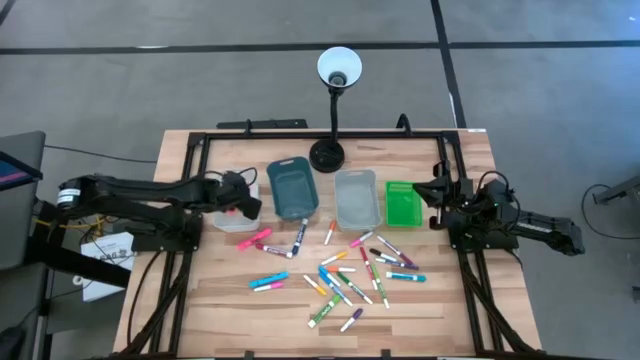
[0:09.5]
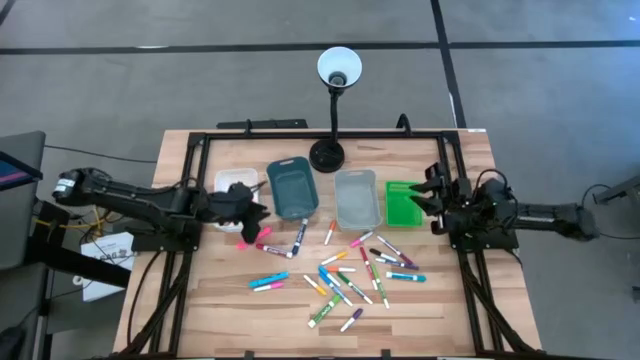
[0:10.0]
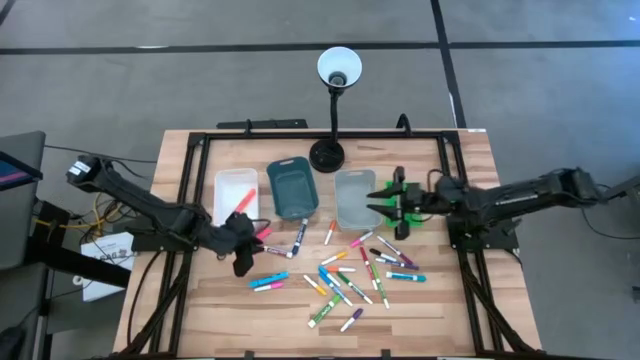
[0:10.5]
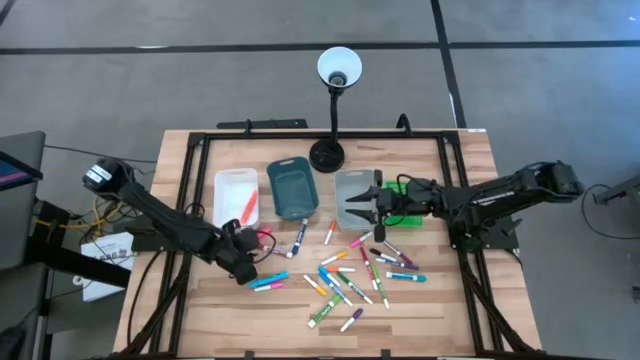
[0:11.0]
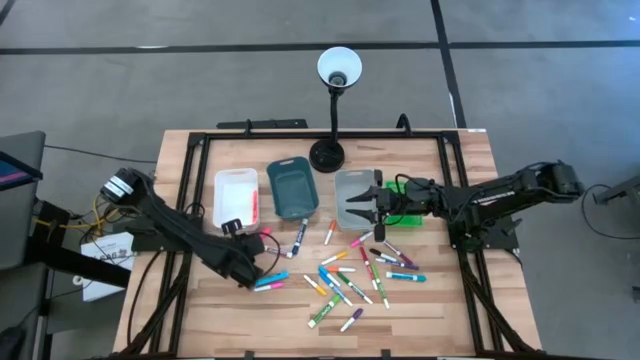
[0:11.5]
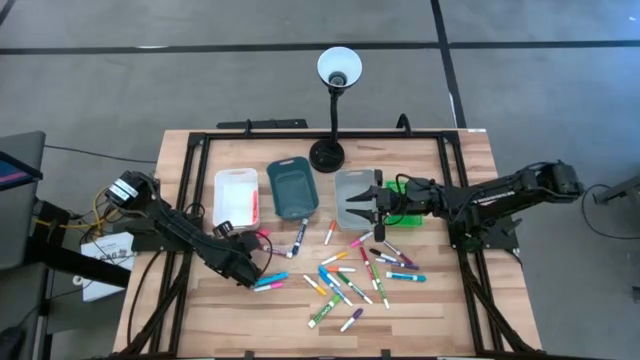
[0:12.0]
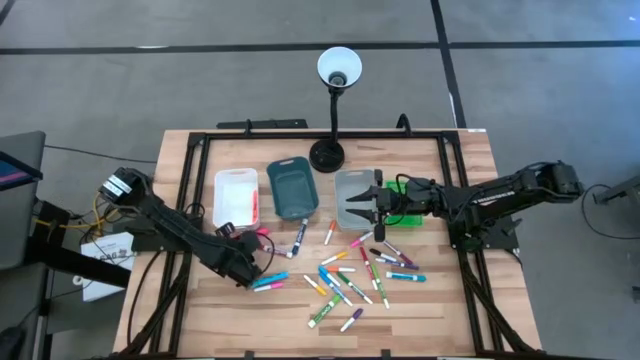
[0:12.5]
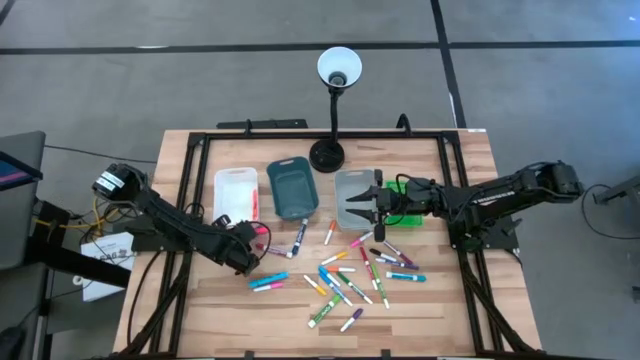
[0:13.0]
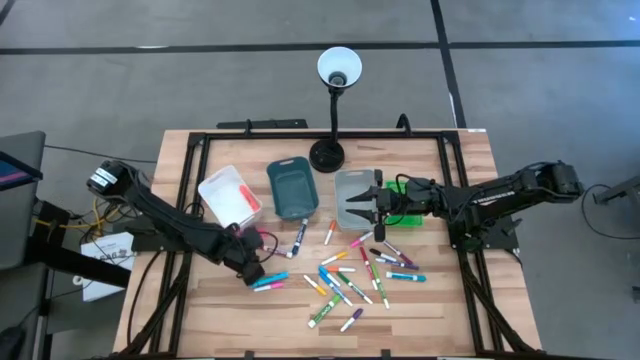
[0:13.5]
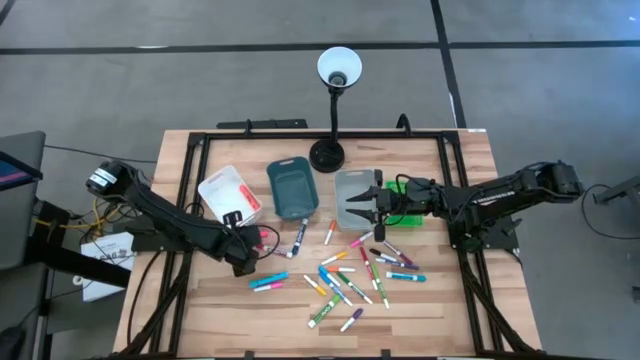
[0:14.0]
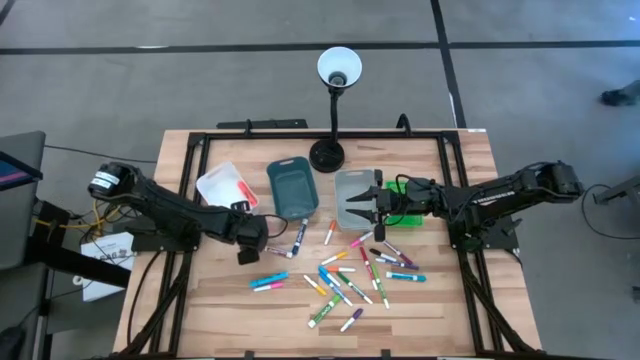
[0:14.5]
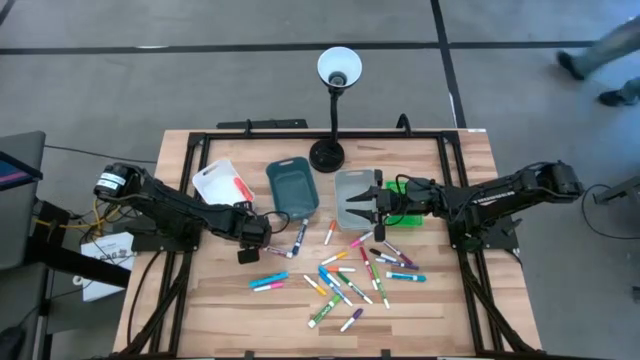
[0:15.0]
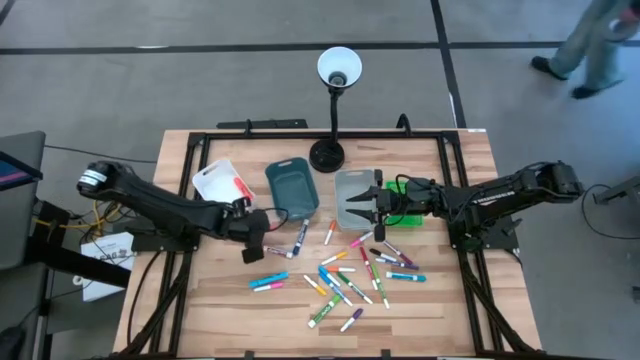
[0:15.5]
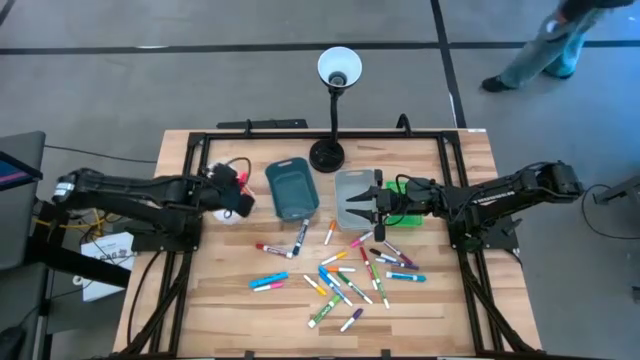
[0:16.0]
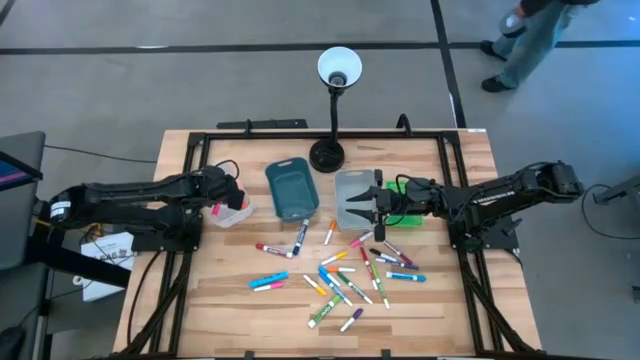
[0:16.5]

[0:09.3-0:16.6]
Task: Pick & Place Markers
Put the pink highlighter pen into the white bin

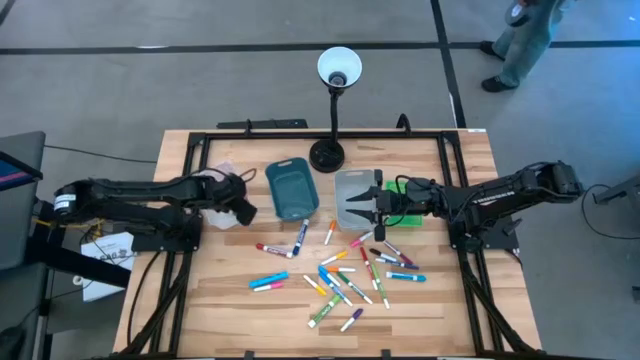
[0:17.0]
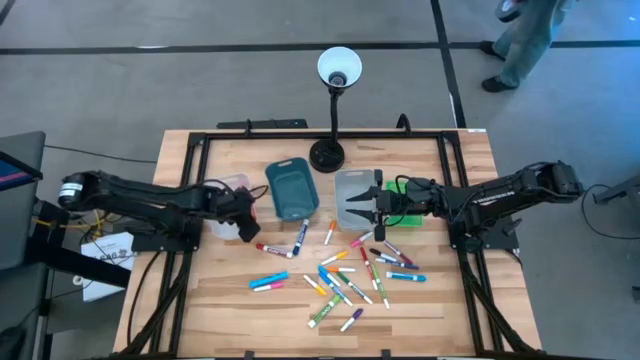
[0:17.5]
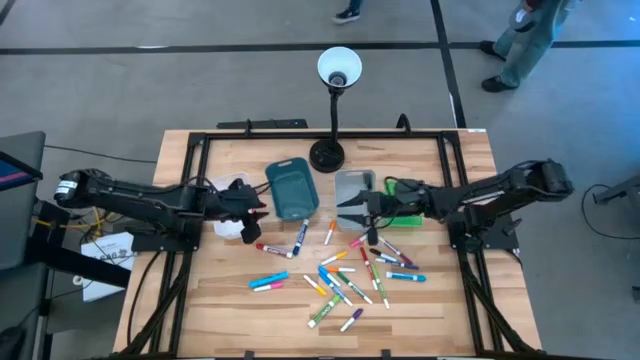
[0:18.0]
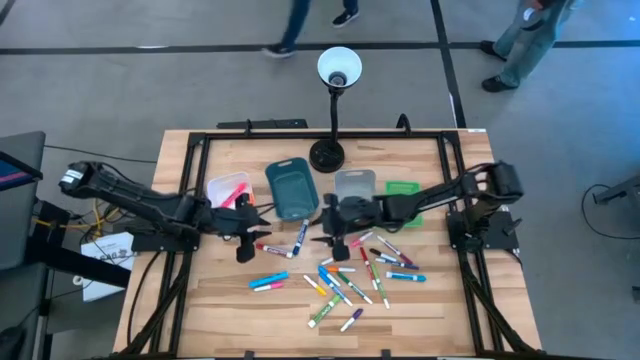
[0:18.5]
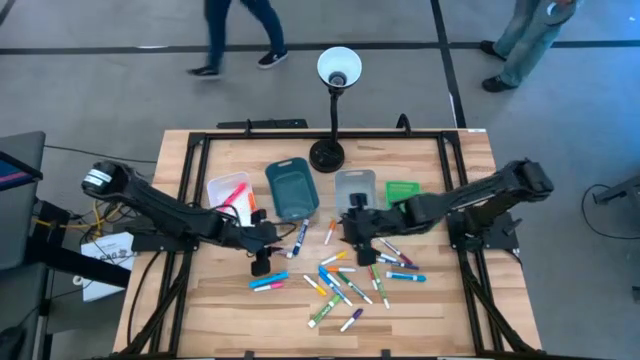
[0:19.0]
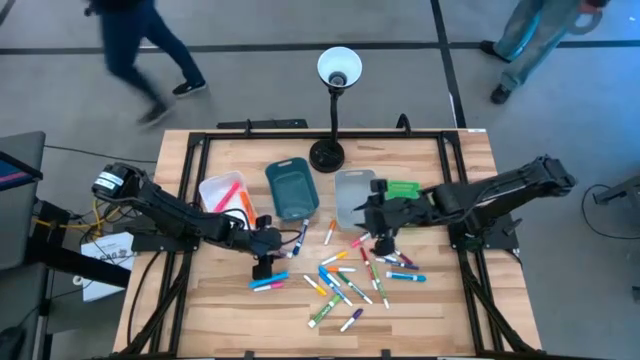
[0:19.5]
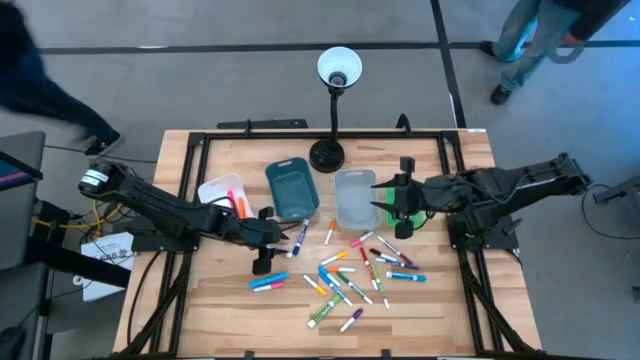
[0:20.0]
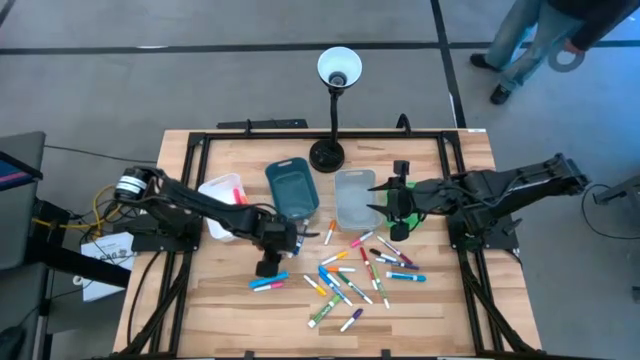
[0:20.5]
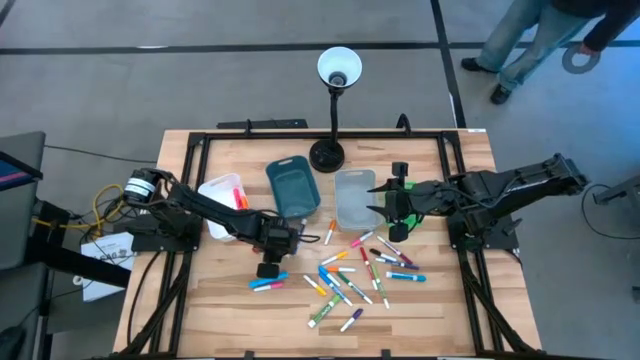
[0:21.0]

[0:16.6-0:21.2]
Put the red big marker pen into the blue bin

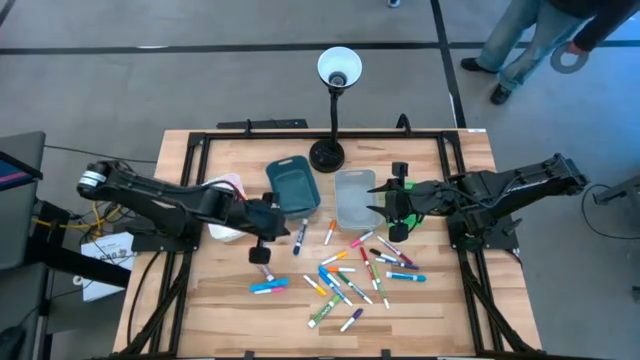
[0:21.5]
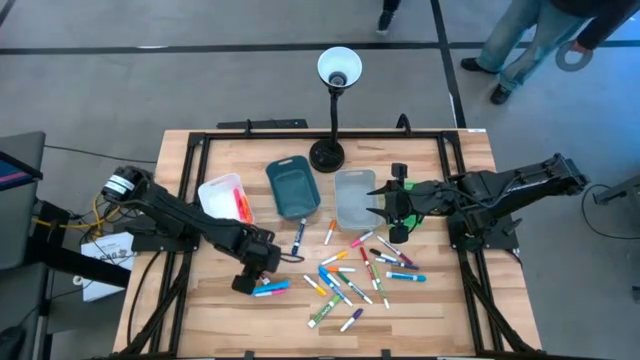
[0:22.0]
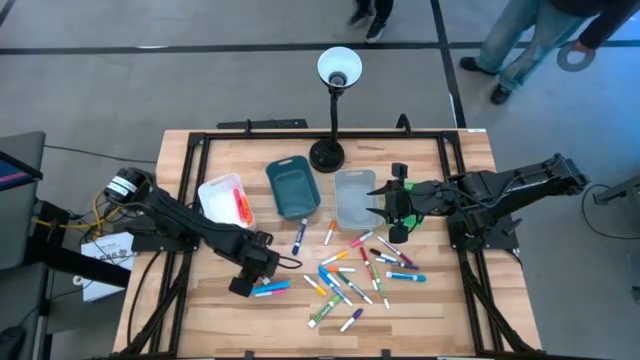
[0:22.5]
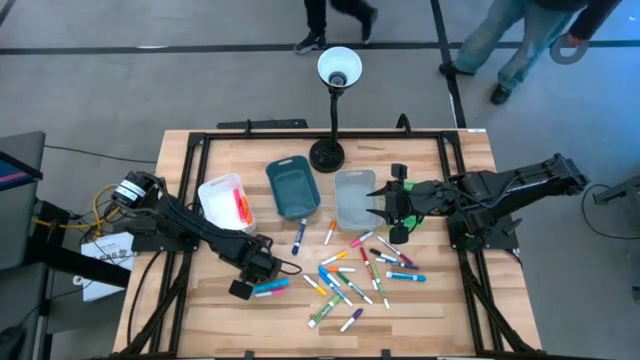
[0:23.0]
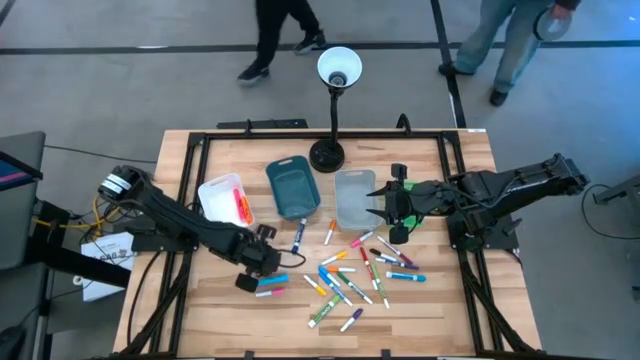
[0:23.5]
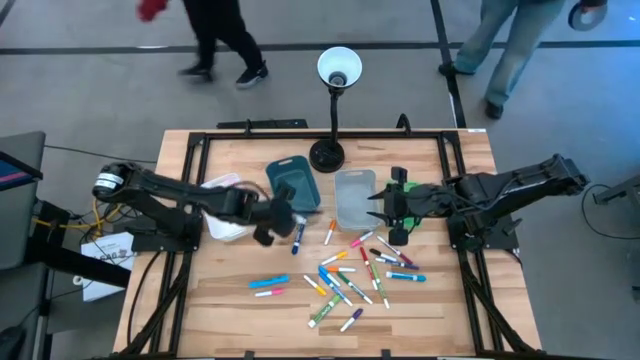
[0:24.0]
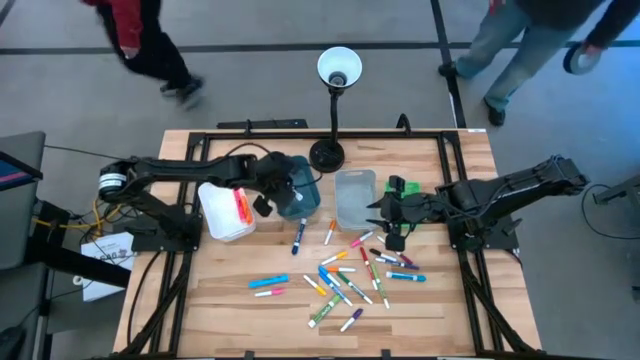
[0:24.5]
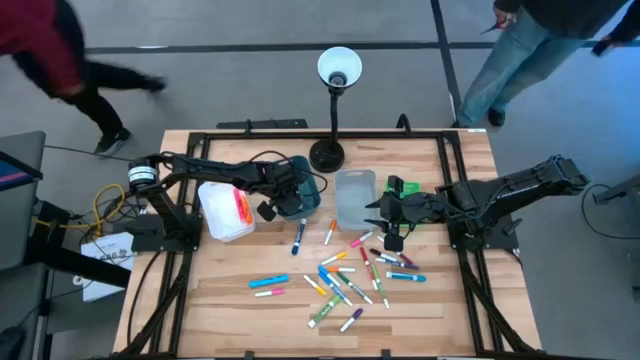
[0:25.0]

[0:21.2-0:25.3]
Put the red big marker pen into the blue bin

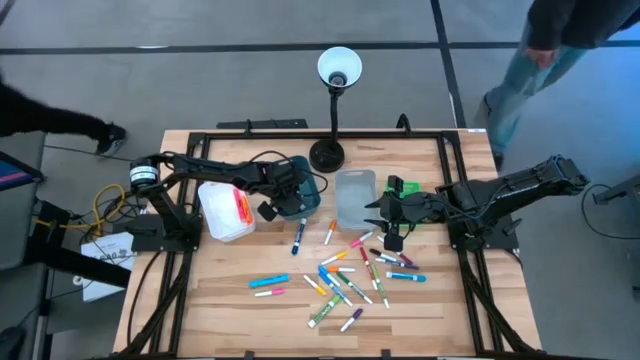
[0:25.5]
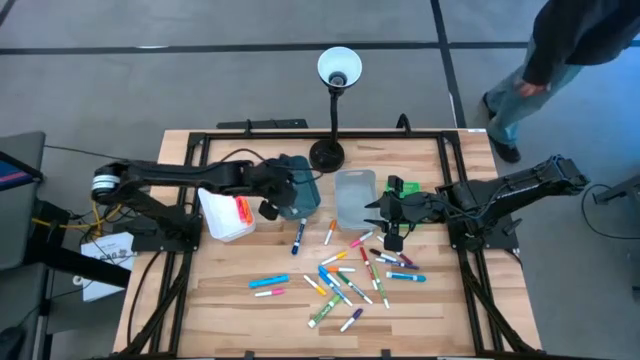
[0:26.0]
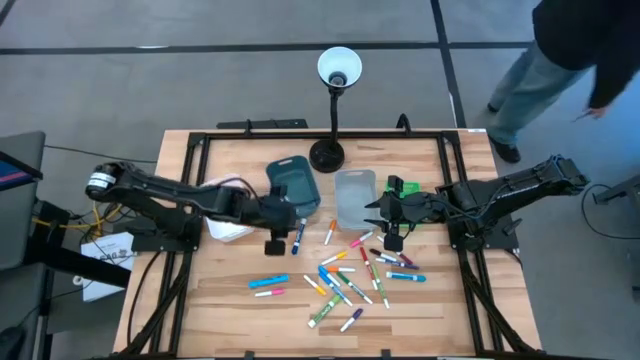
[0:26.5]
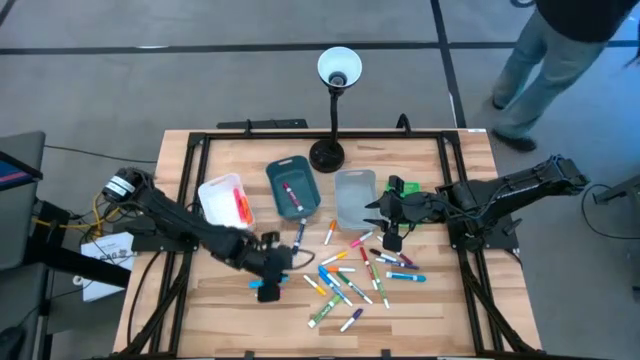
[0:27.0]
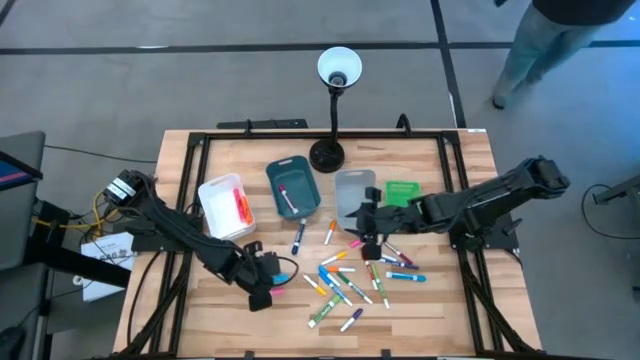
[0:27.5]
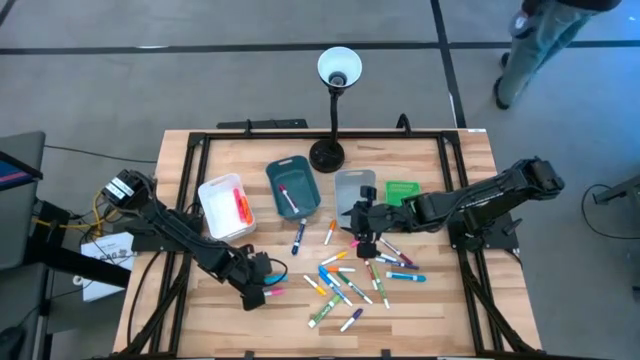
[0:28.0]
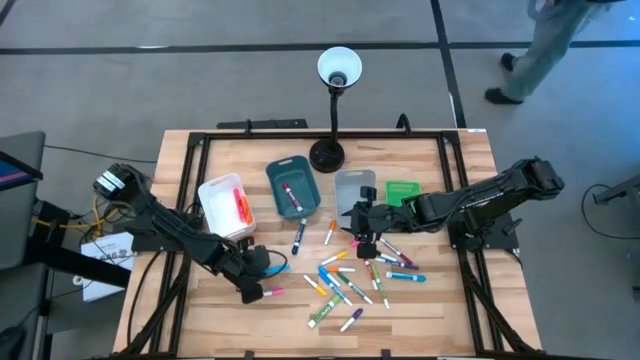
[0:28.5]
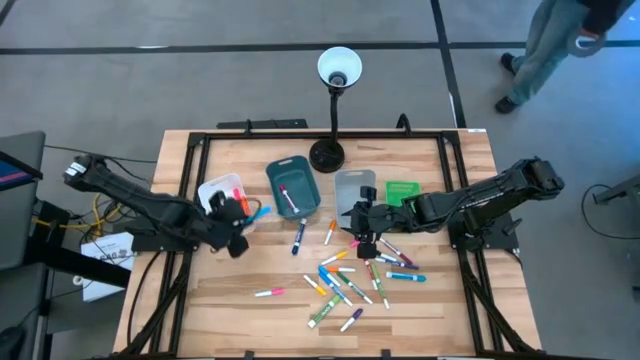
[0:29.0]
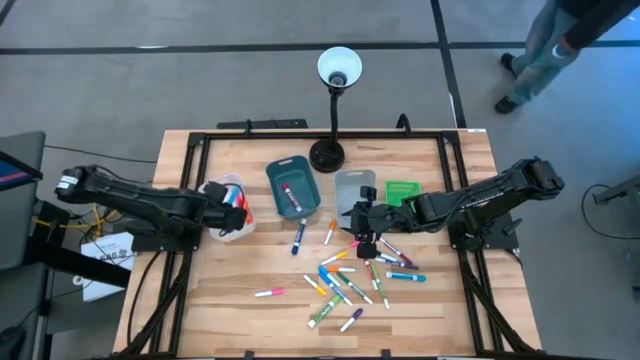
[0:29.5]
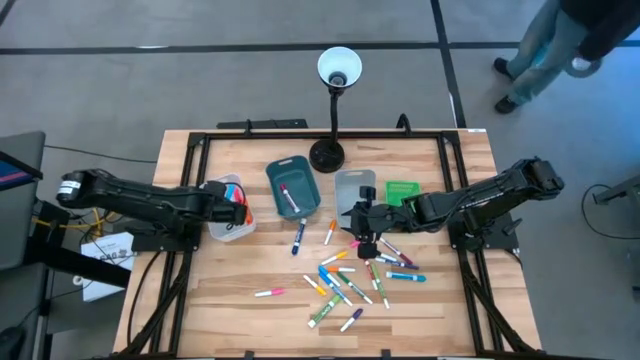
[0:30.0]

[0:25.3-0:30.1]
Put the blue highlighter pen into the white bin
